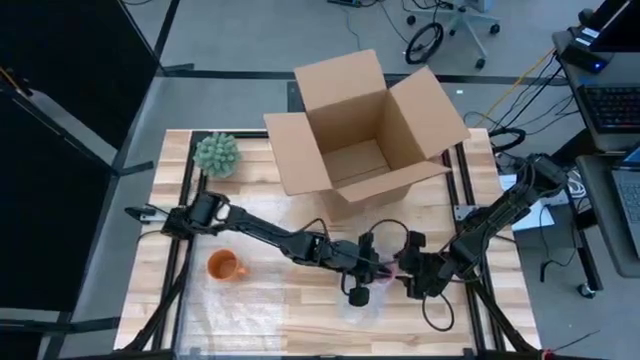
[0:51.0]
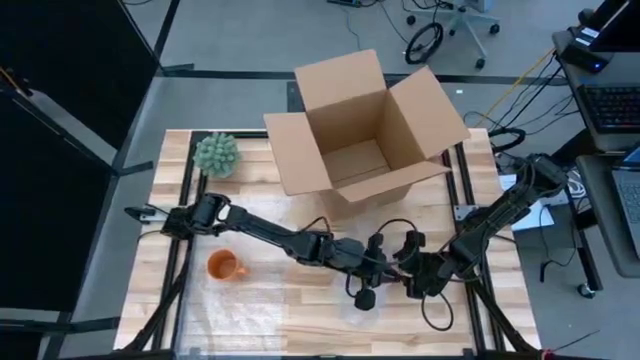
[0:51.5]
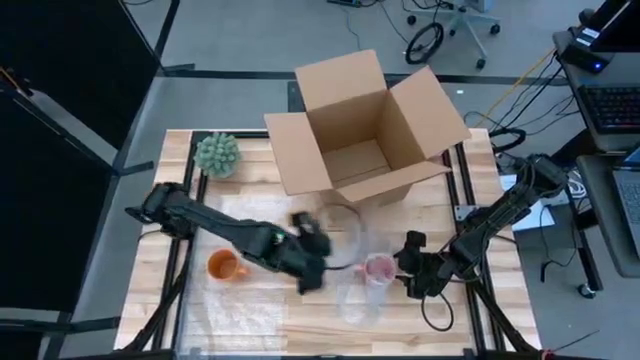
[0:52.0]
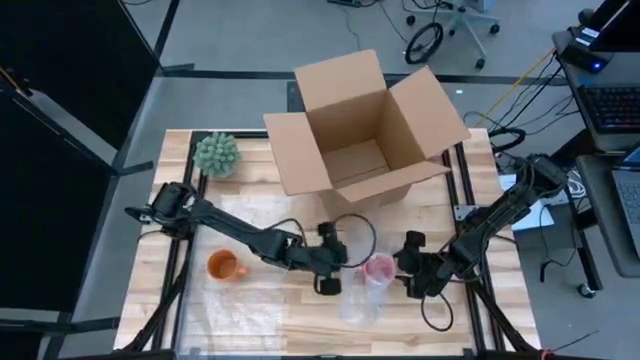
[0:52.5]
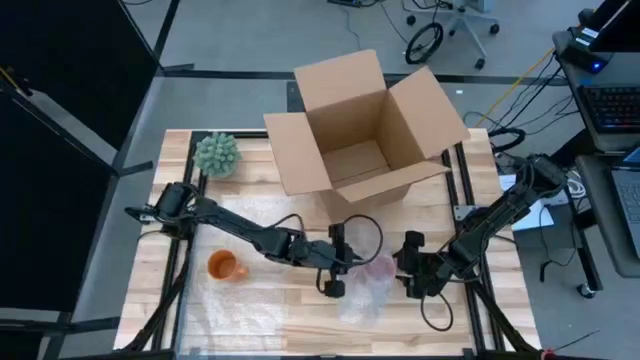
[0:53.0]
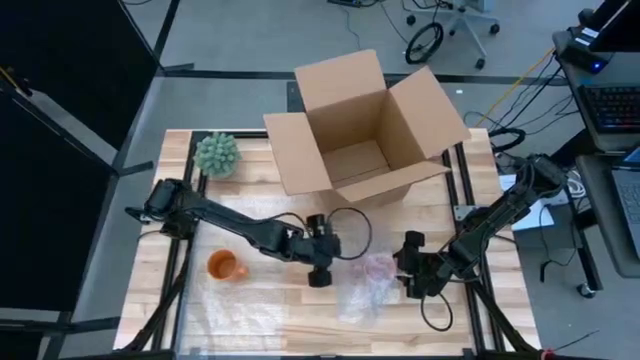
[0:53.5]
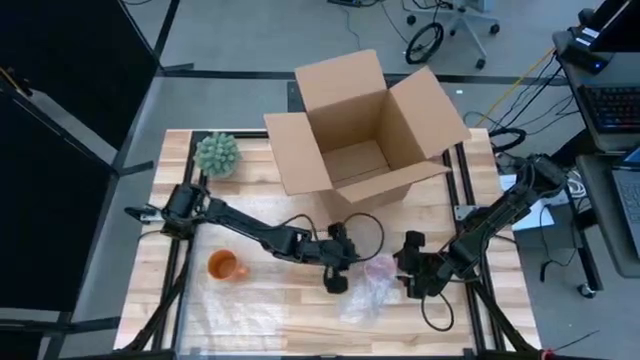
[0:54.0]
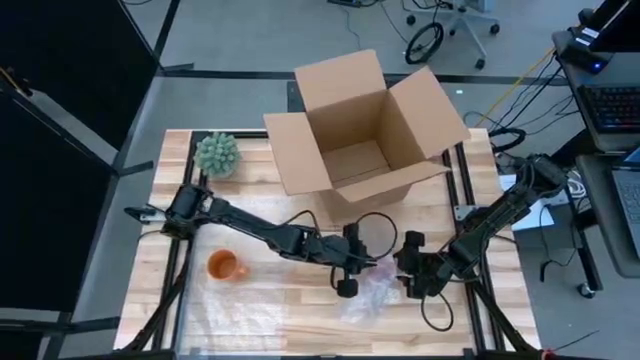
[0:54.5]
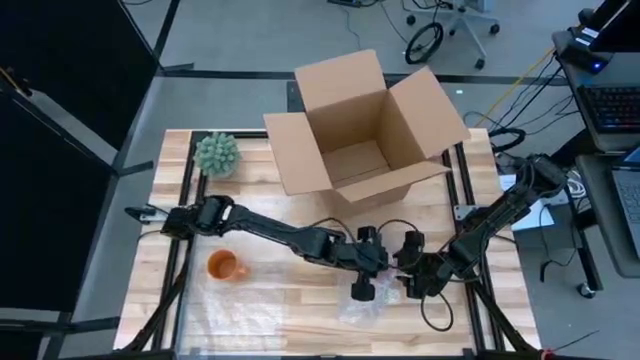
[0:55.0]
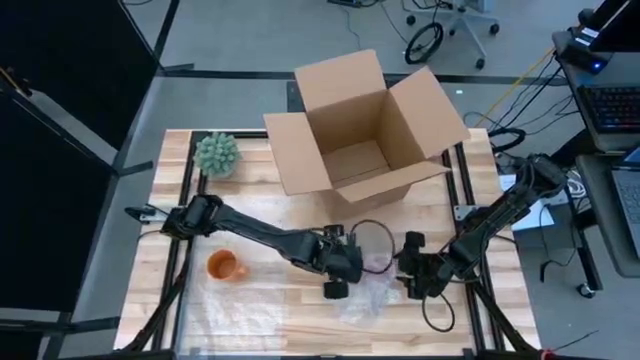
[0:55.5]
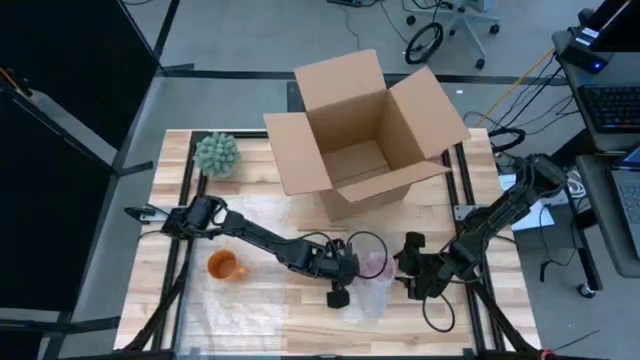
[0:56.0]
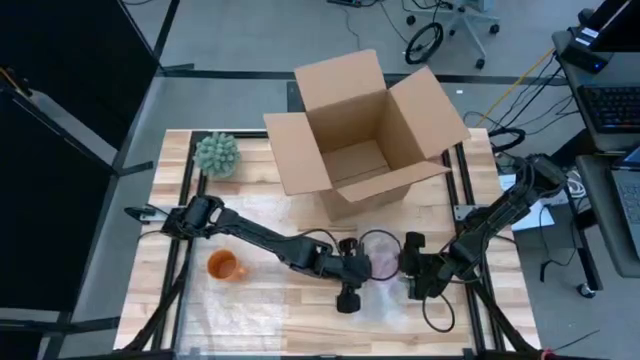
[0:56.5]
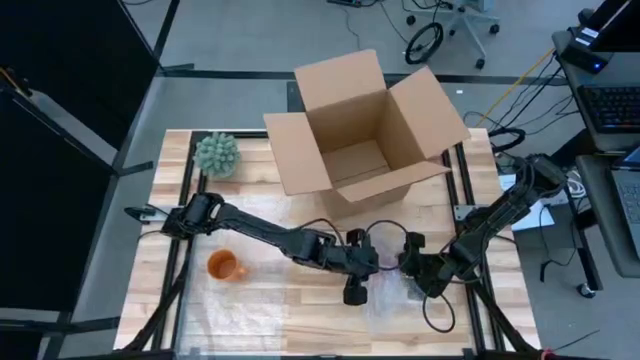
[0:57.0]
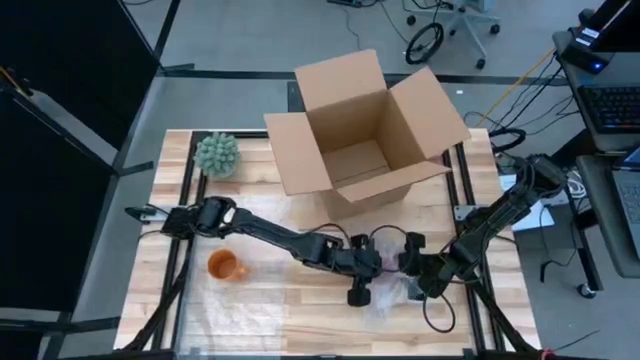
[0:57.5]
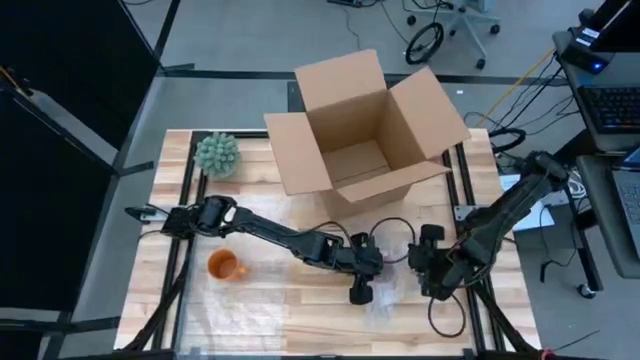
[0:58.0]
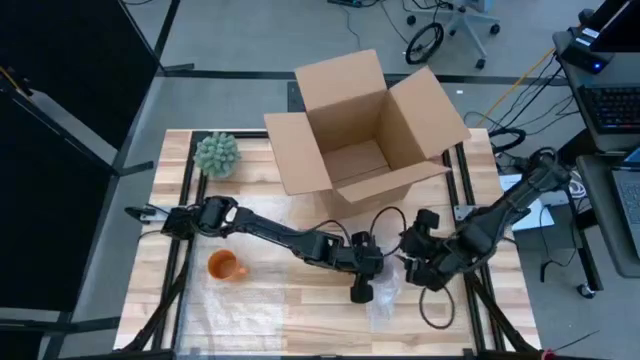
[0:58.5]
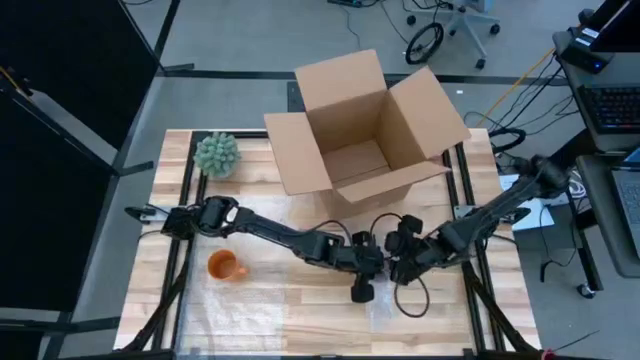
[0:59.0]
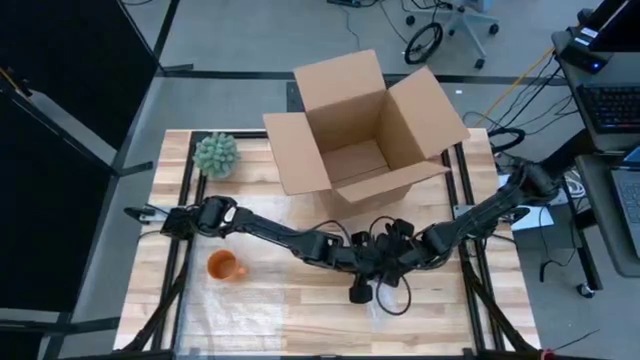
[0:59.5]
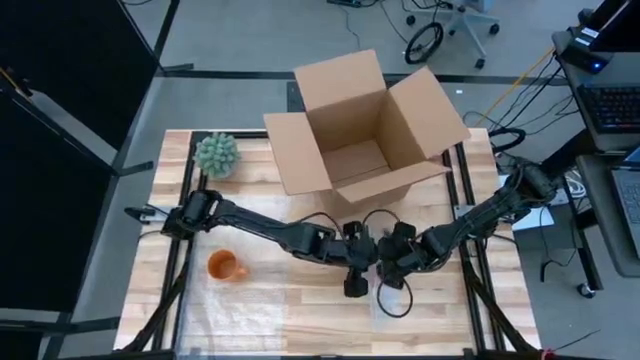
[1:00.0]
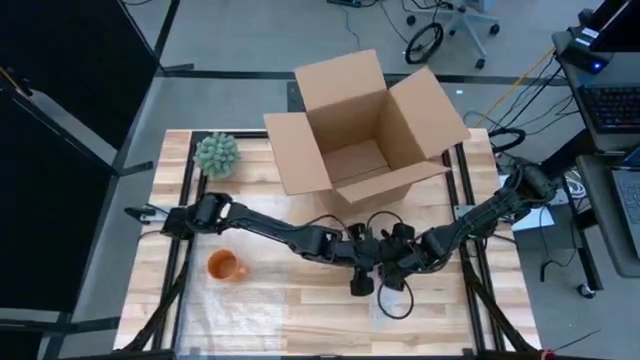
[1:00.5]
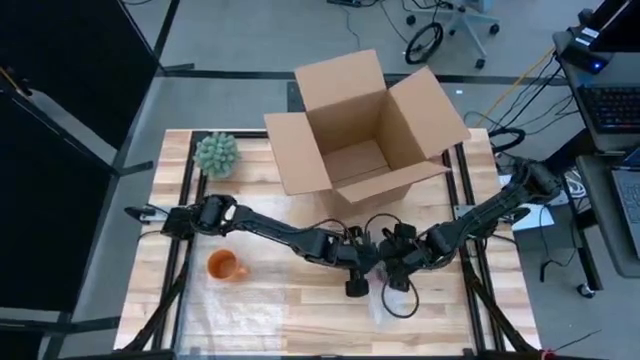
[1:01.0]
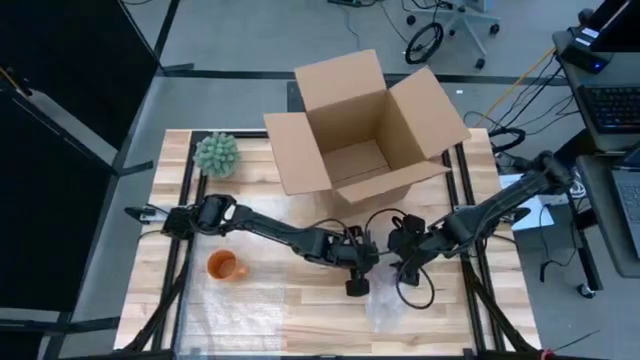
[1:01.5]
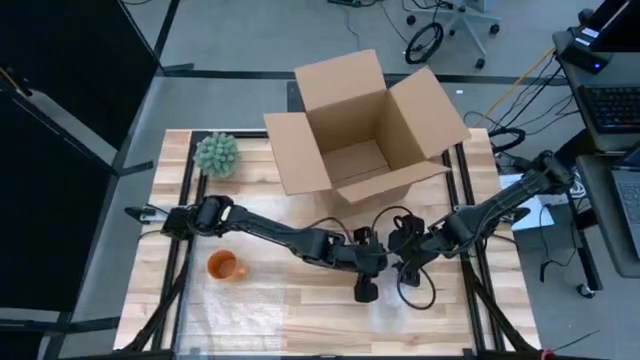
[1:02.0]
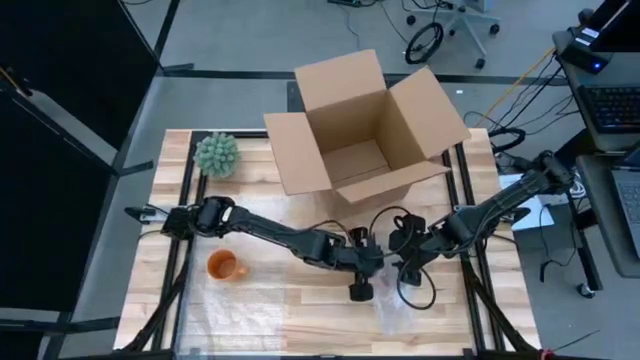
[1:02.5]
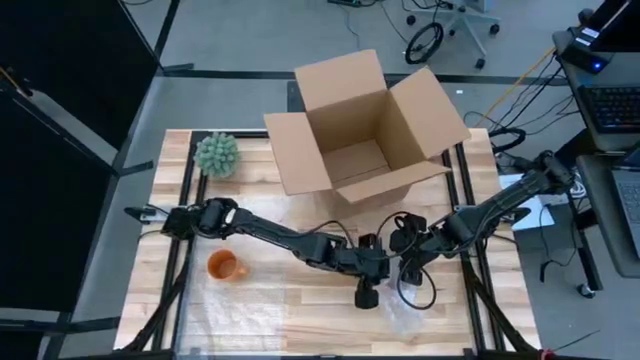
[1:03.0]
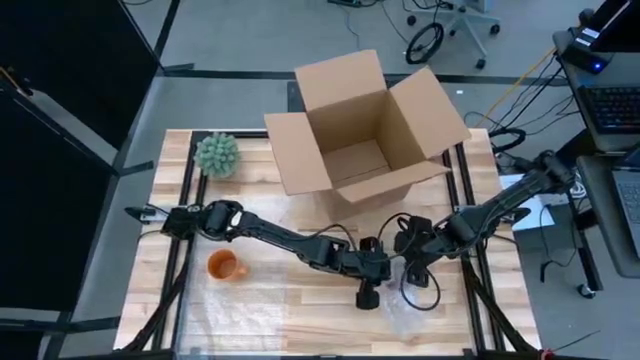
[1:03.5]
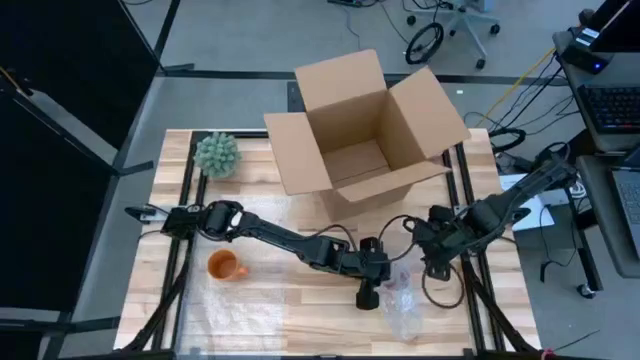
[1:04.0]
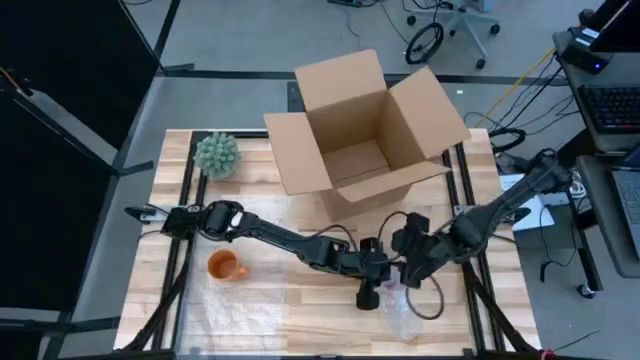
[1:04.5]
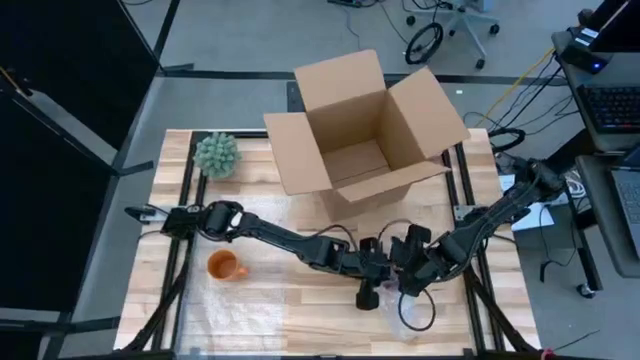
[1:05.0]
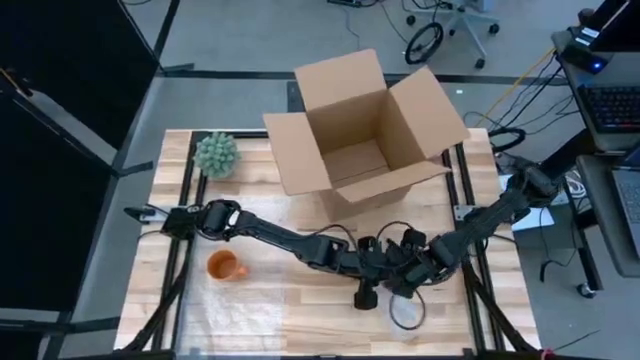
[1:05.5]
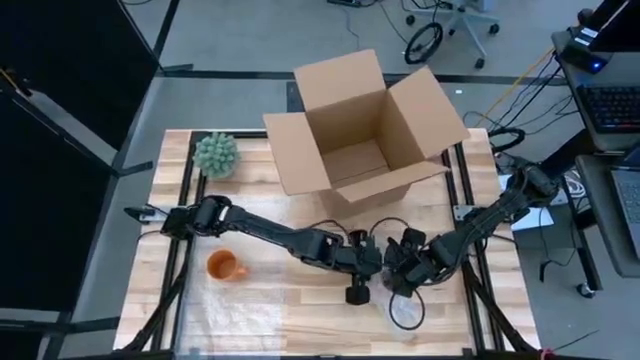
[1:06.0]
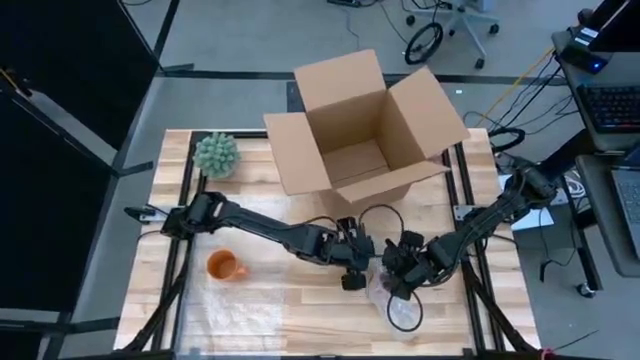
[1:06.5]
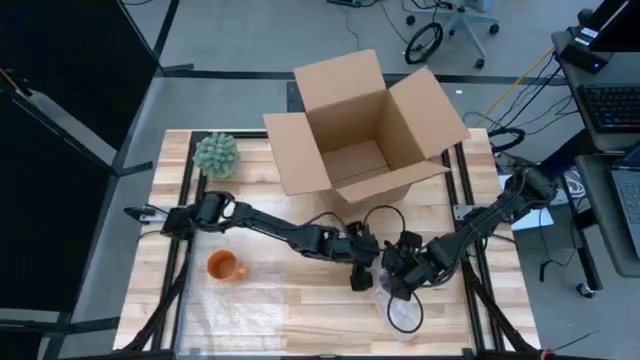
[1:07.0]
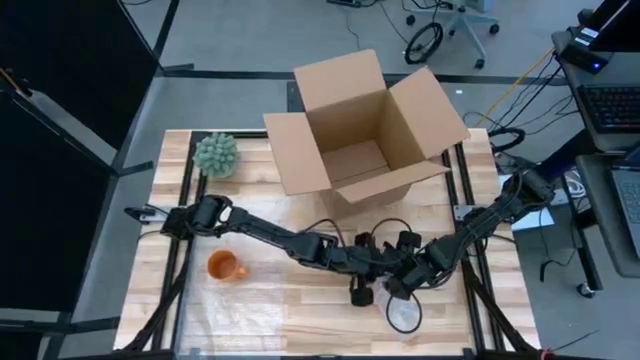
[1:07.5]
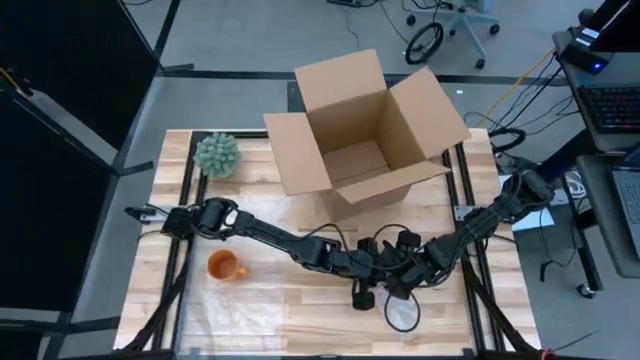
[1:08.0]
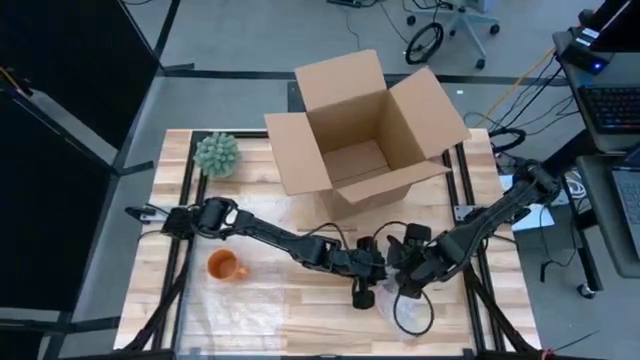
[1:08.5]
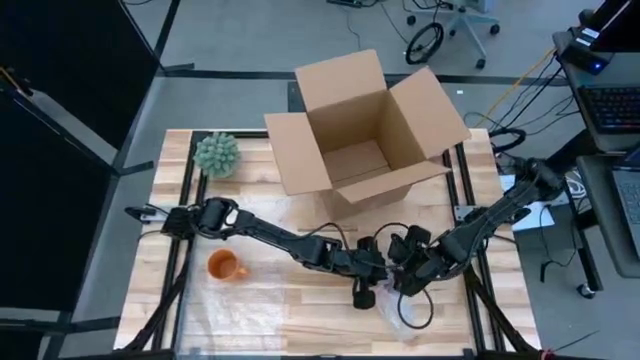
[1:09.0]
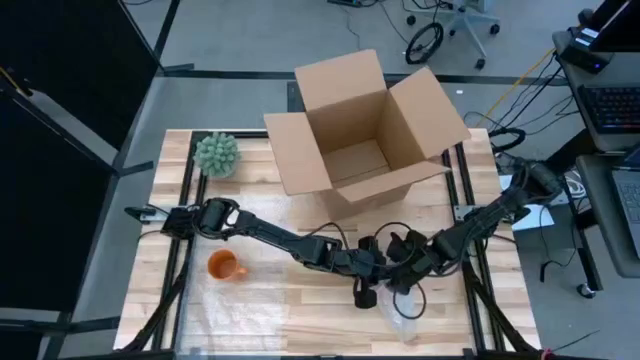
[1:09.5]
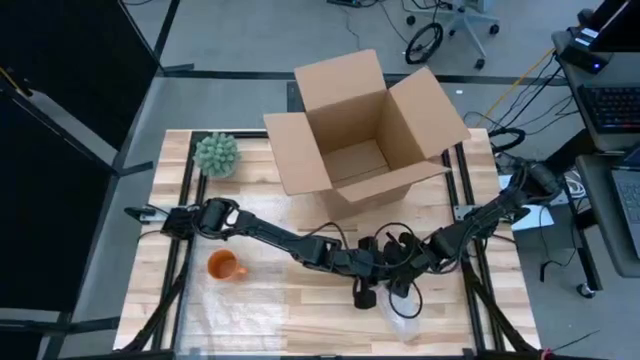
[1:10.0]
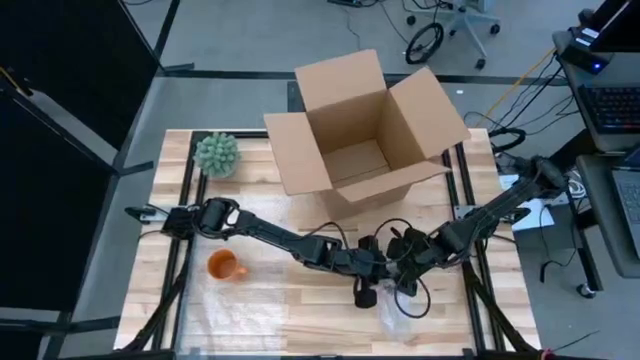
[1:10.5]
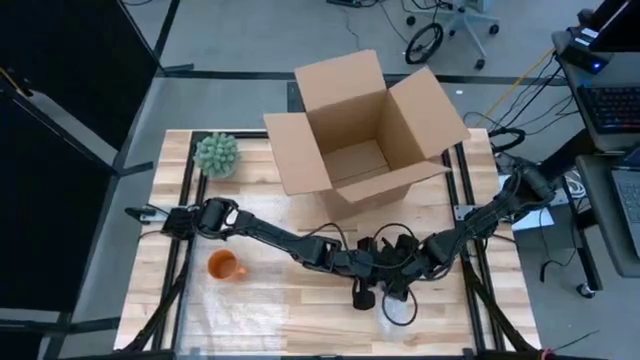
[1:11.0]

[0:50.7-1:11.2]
Task: wrap mug
Wrap the pink mug with bubble wrap
